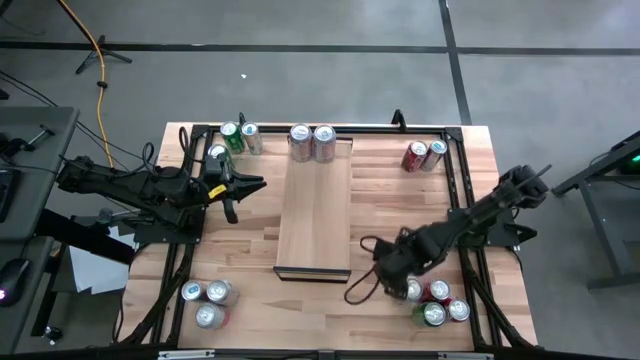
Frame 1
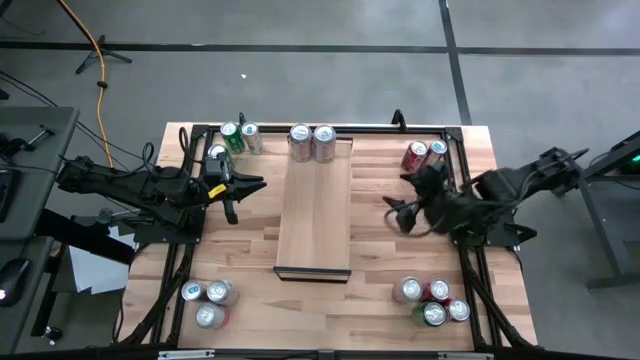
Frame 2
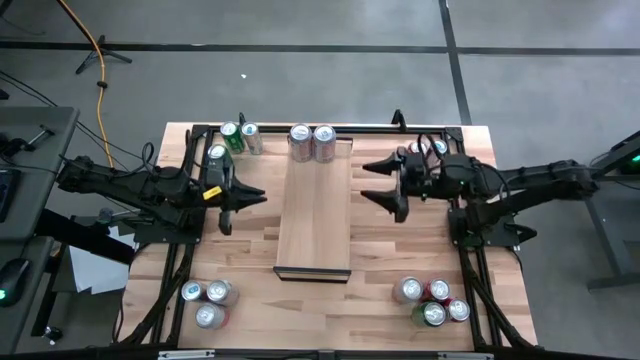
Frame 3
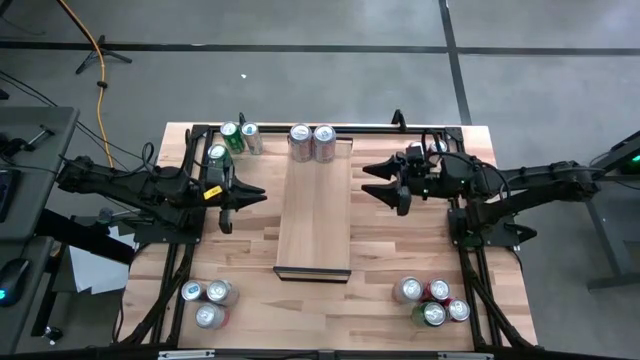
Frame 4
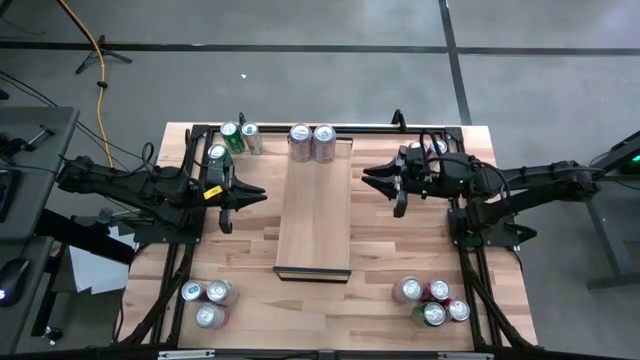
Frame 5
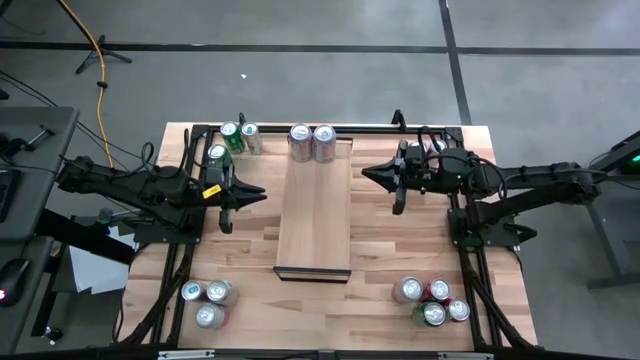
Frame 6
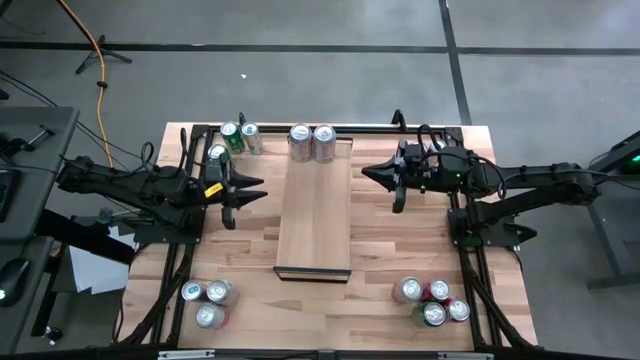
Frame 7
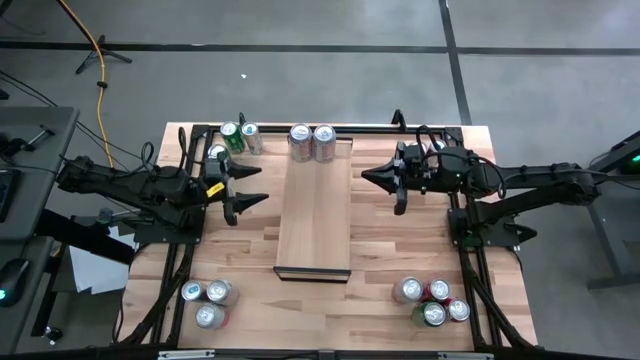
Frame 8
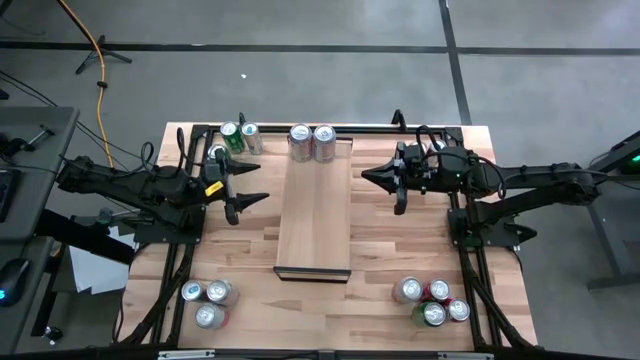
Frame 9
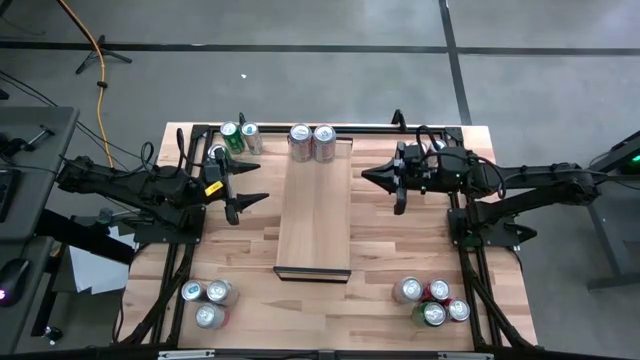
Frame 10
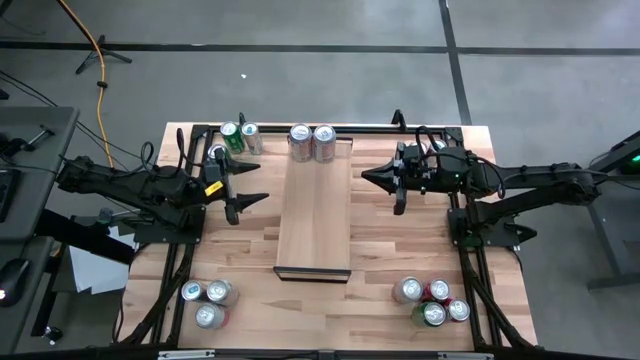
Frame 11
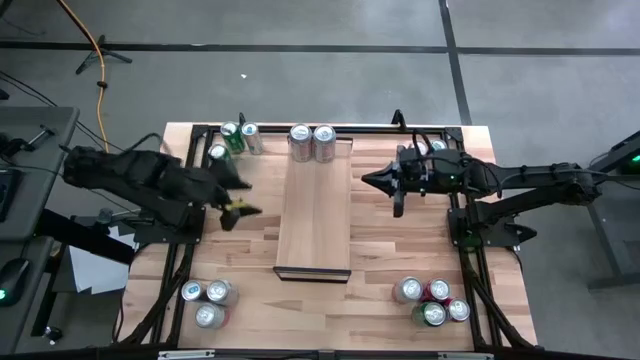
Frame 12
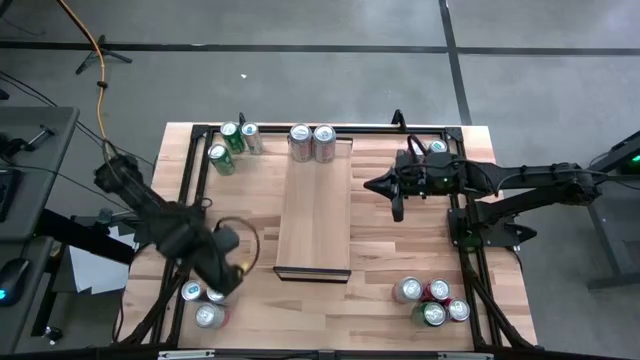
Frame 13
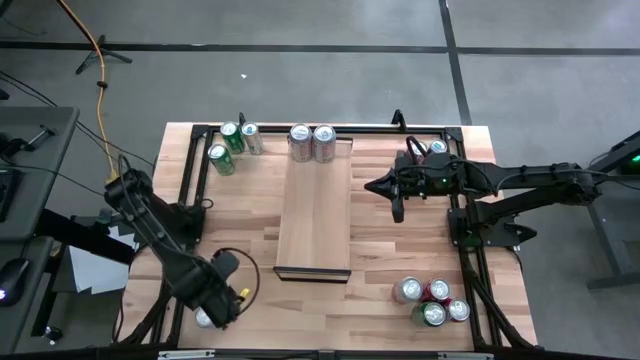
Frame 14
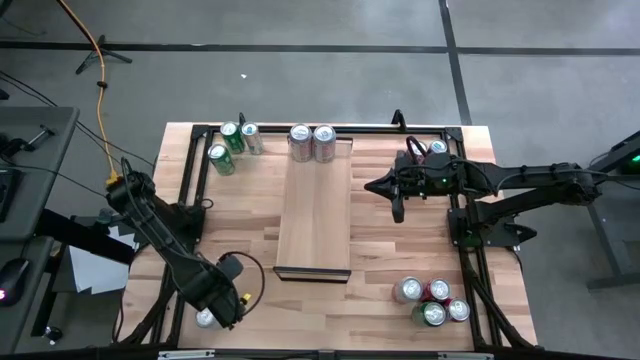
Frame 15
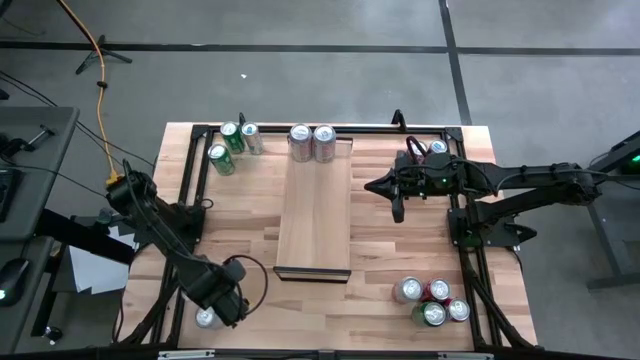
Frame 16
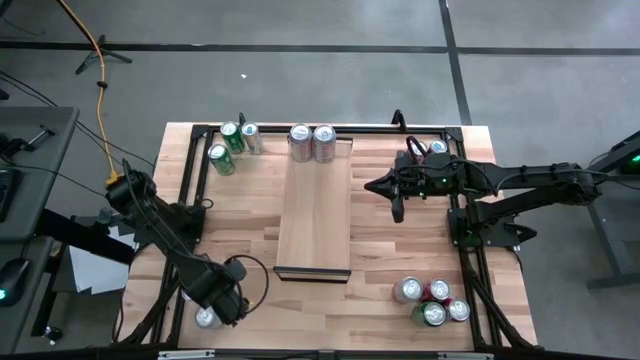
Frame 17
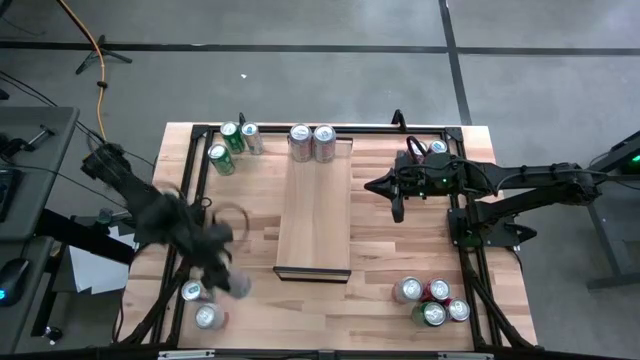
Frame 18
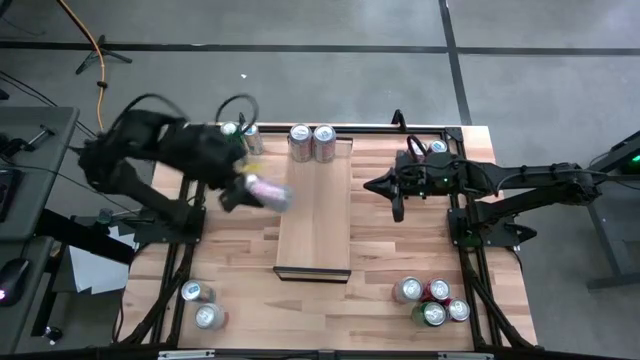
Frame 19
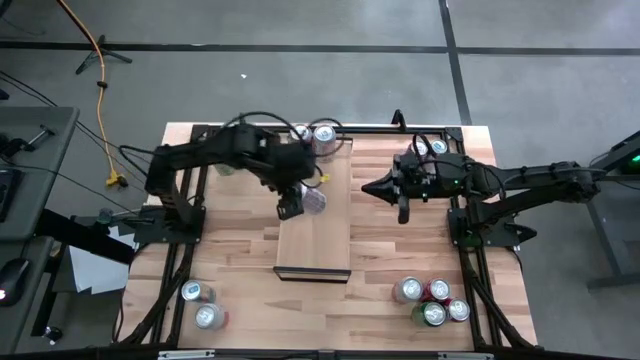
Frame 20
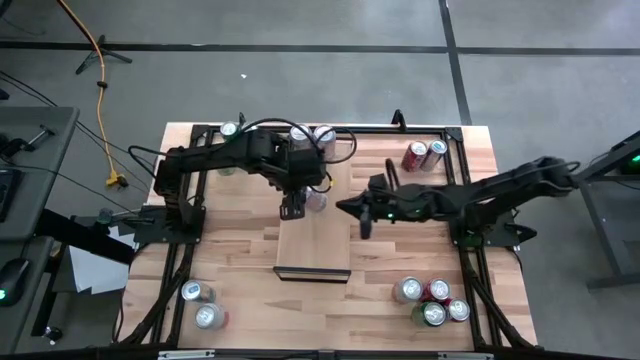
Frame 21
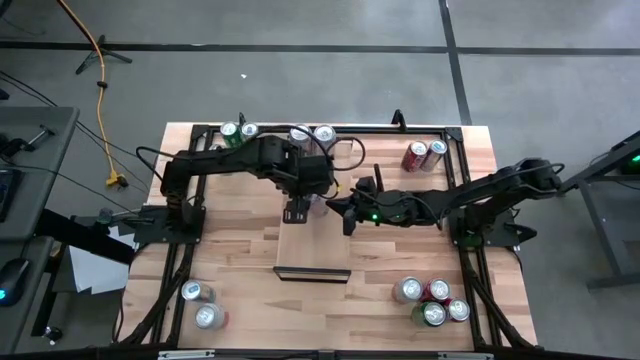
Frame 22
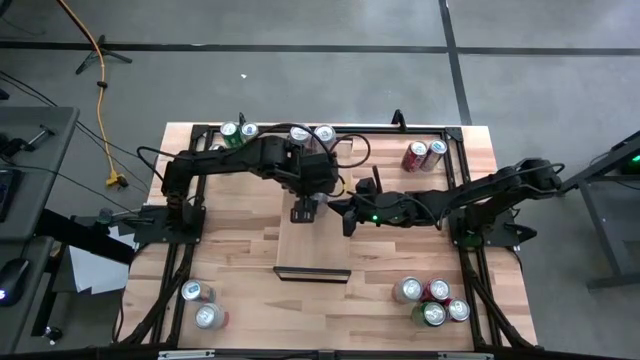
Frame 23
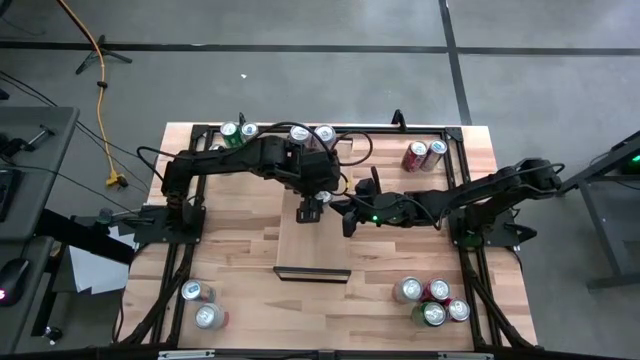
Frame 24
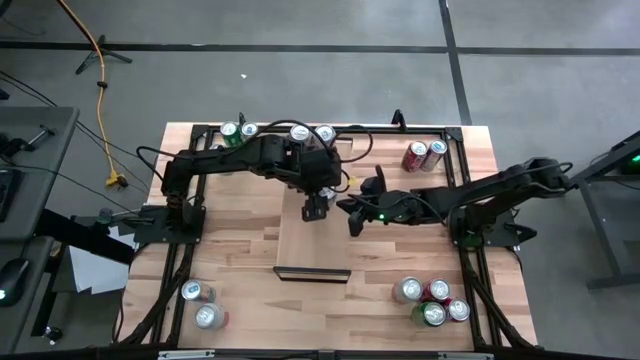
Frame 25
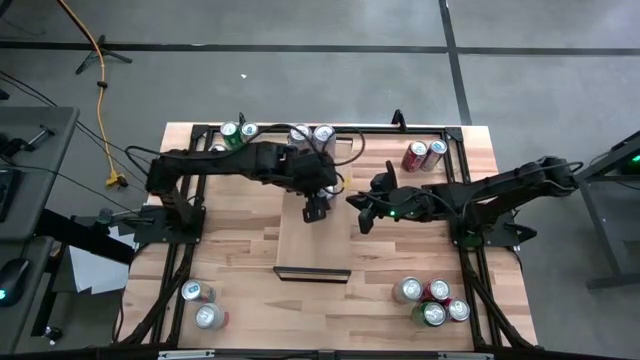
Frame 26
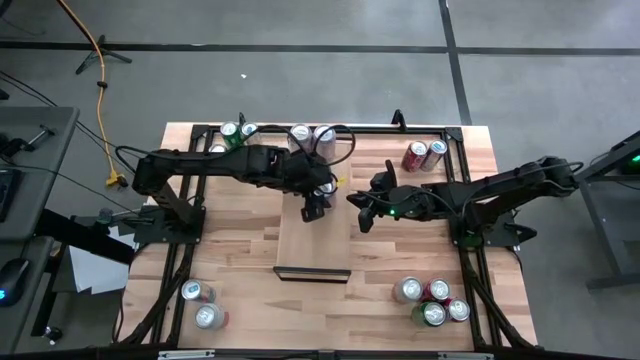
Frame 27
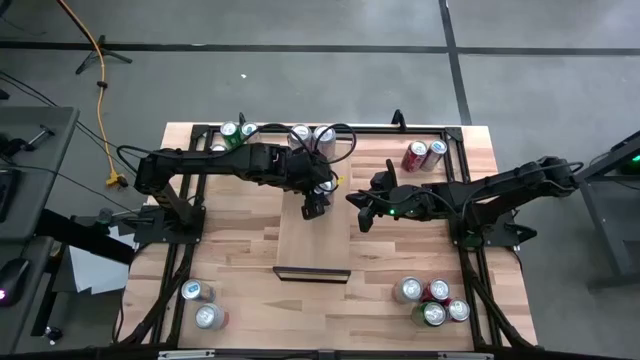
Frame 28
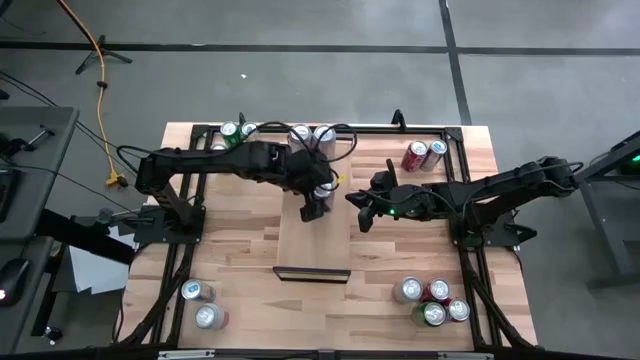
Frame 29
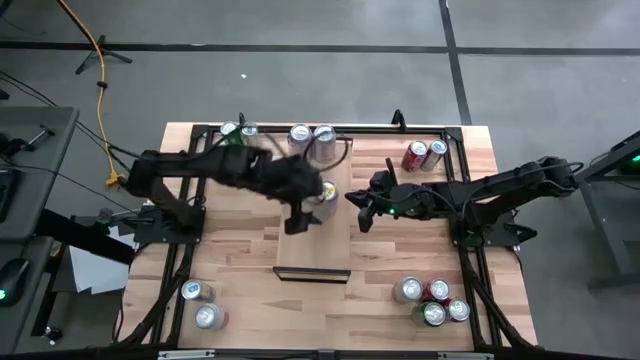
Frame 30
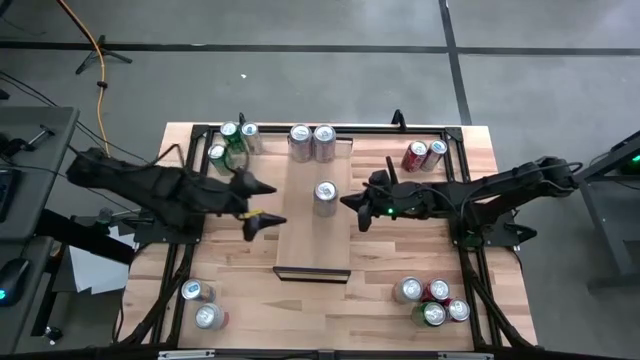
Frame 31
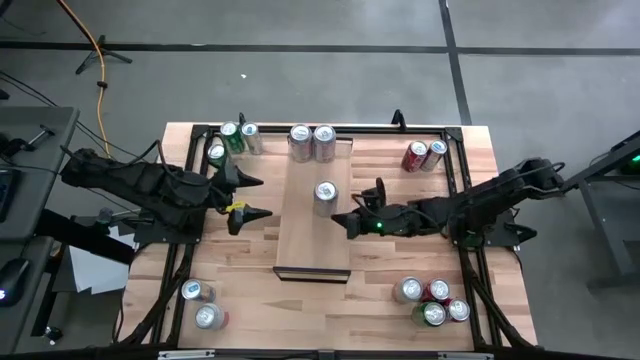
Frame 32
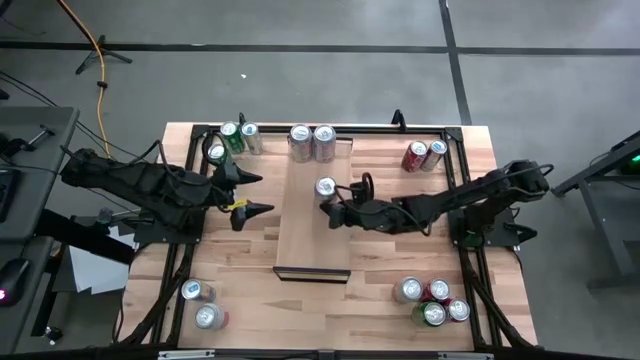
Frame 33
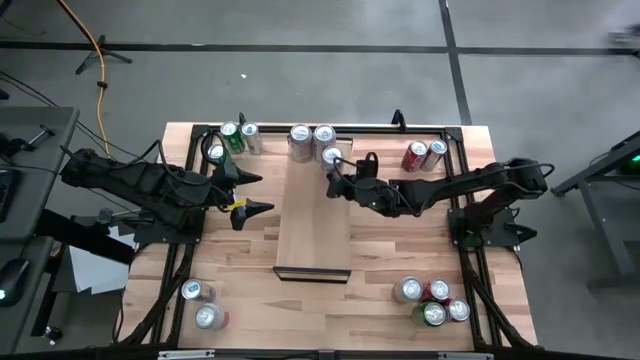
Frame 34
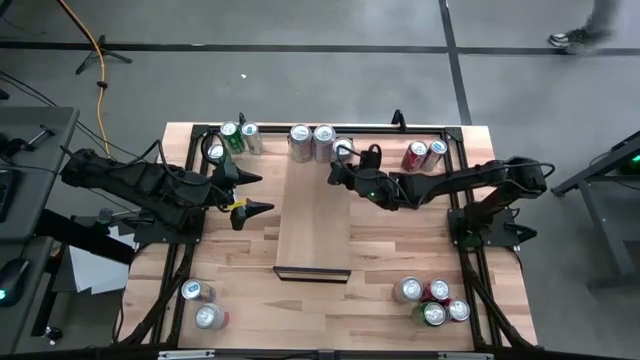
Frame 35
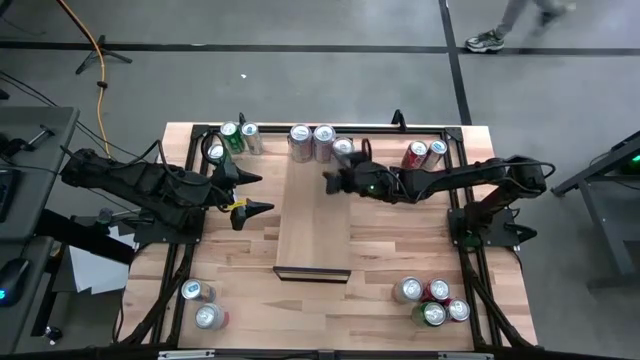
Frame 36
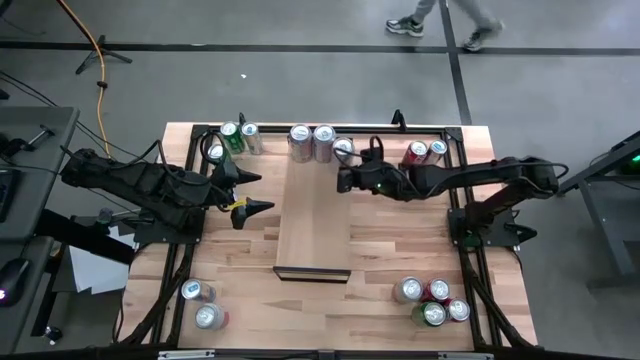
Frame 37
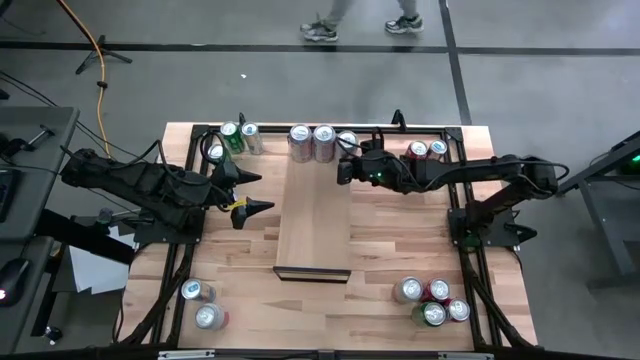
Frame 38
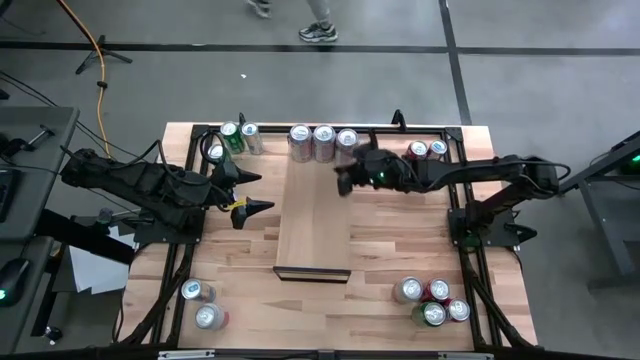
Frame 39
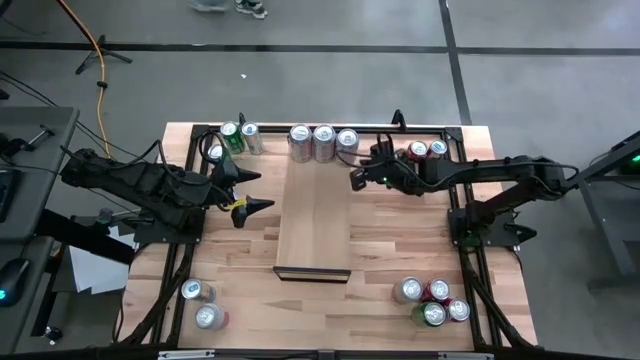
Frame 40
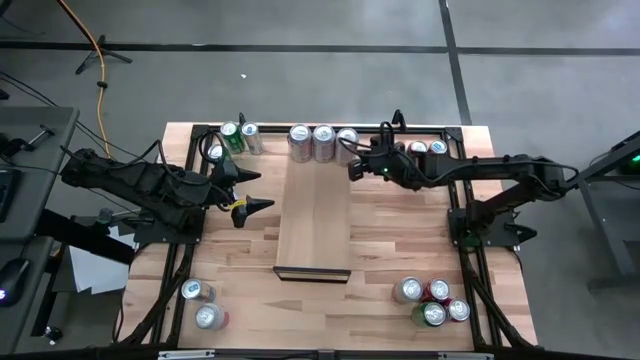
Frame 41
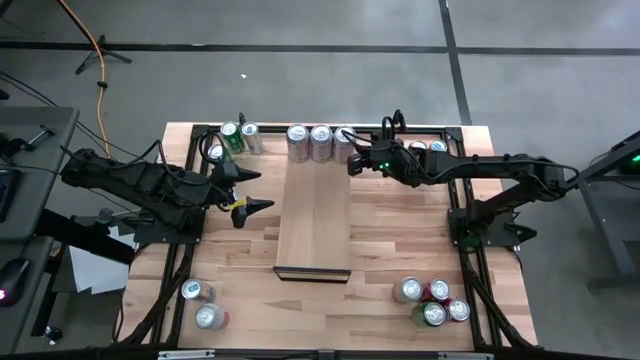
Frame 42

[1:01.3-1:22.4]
Task: Place canned beverage on shelf
Put the silver soda can on the shelf
